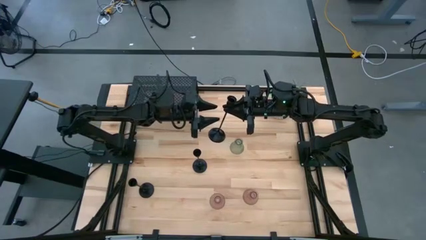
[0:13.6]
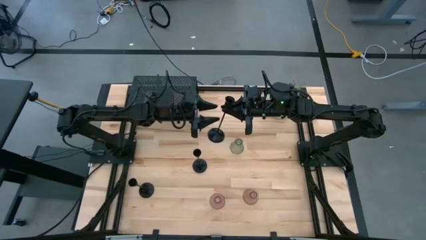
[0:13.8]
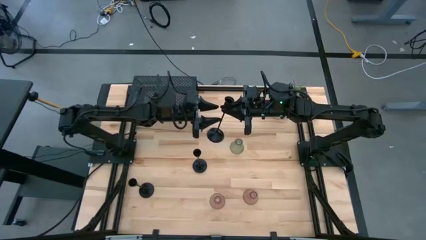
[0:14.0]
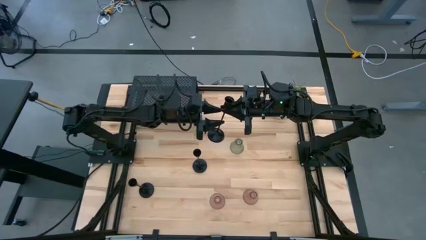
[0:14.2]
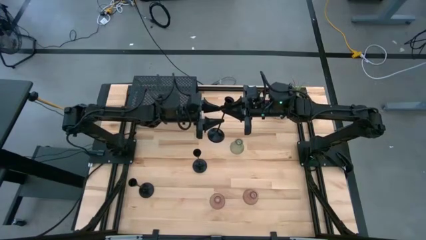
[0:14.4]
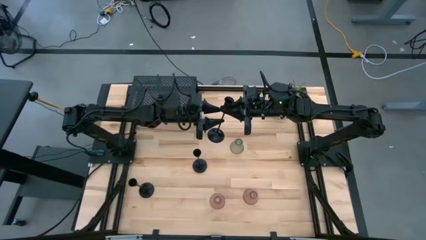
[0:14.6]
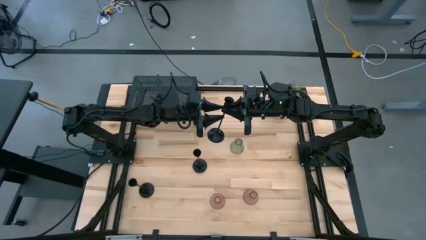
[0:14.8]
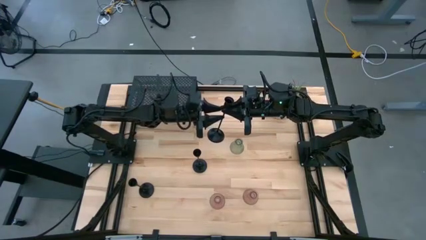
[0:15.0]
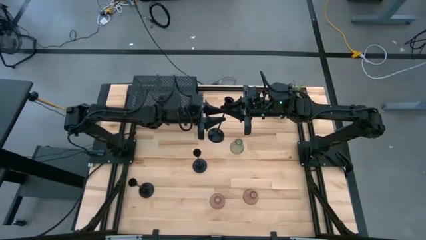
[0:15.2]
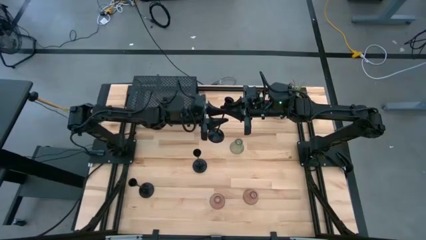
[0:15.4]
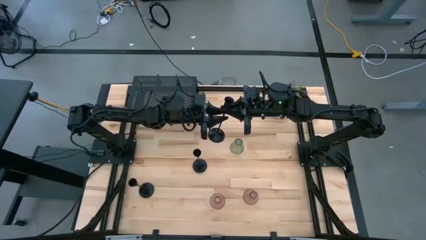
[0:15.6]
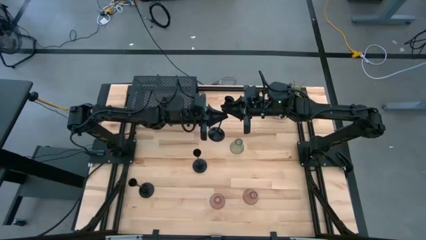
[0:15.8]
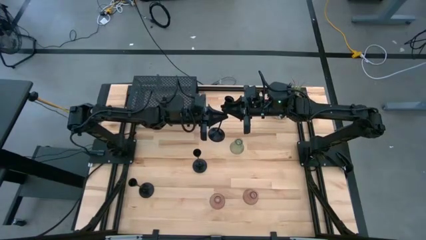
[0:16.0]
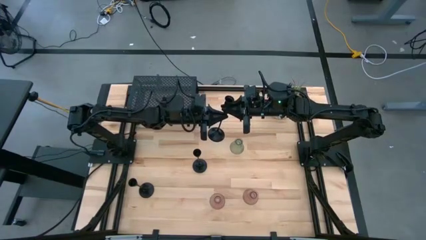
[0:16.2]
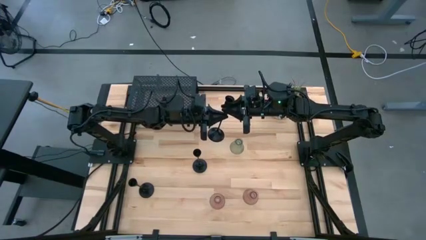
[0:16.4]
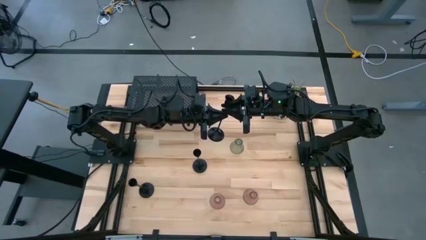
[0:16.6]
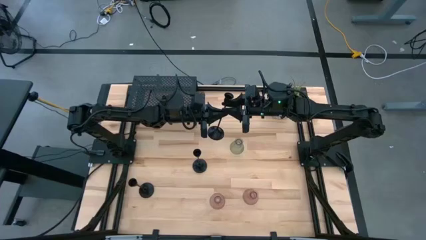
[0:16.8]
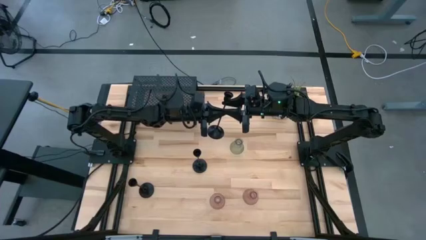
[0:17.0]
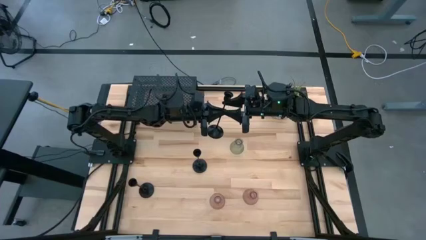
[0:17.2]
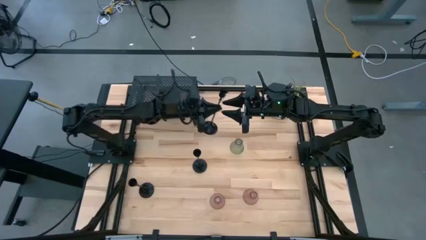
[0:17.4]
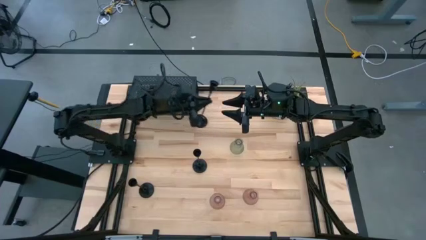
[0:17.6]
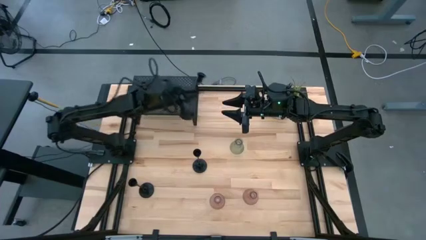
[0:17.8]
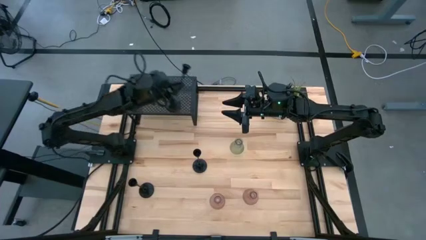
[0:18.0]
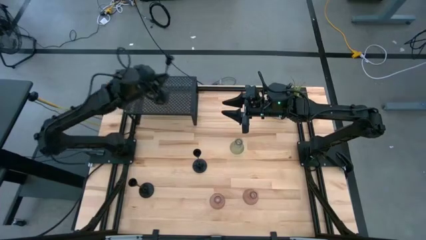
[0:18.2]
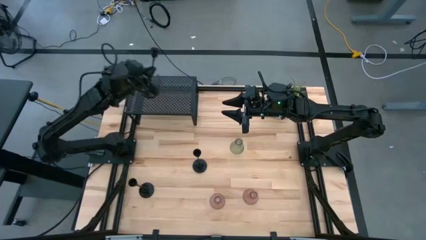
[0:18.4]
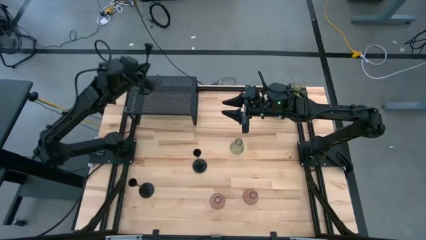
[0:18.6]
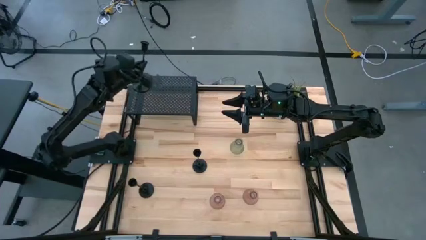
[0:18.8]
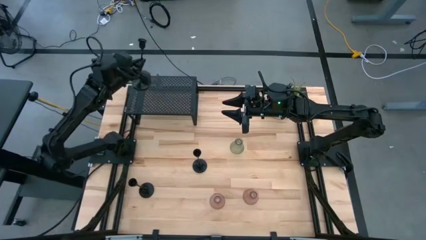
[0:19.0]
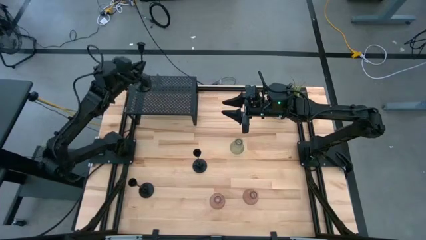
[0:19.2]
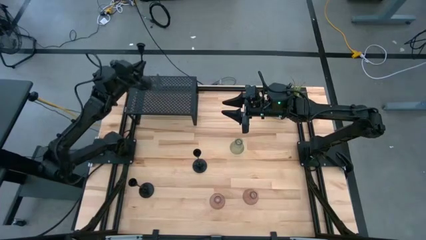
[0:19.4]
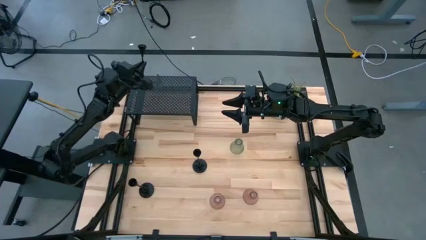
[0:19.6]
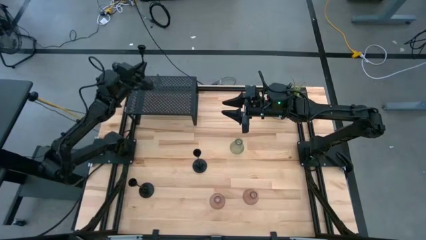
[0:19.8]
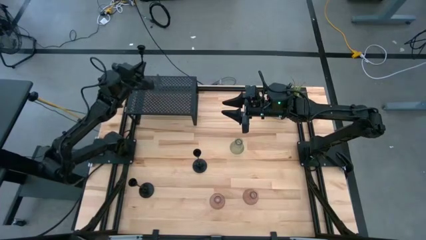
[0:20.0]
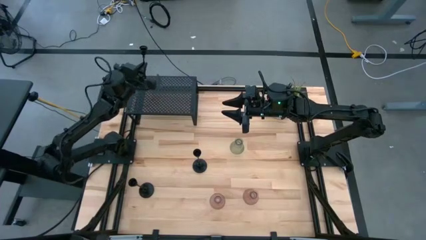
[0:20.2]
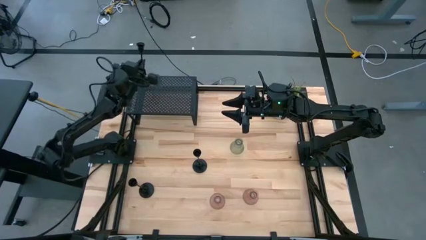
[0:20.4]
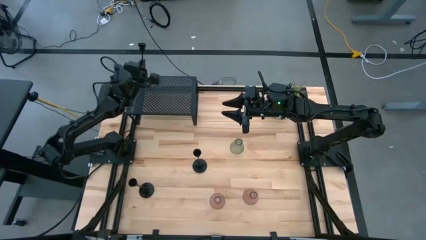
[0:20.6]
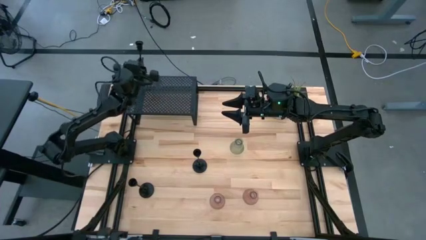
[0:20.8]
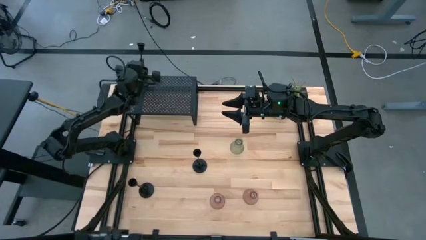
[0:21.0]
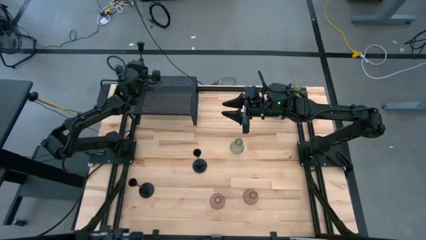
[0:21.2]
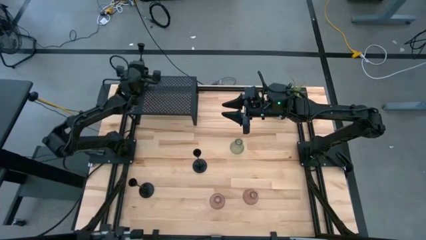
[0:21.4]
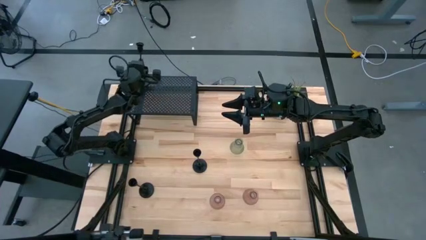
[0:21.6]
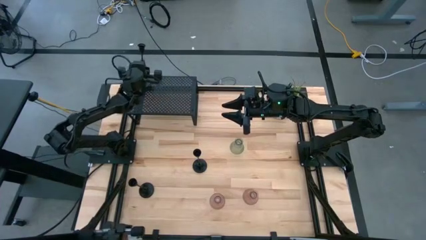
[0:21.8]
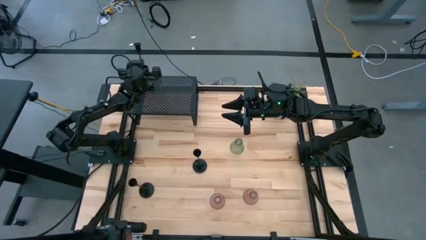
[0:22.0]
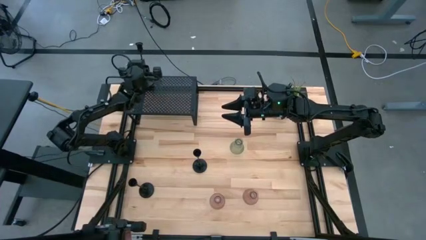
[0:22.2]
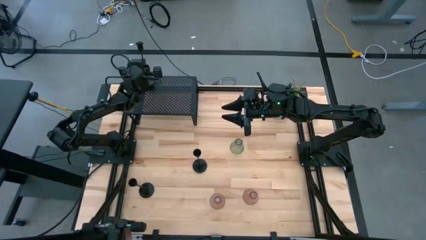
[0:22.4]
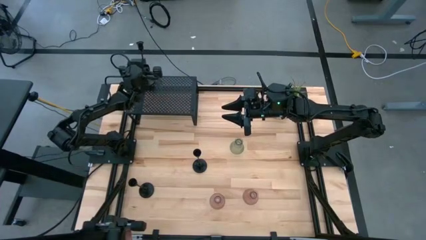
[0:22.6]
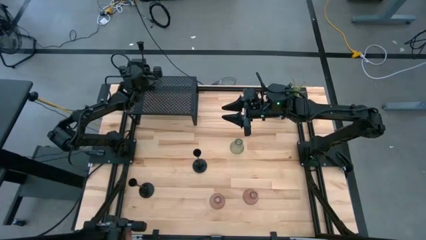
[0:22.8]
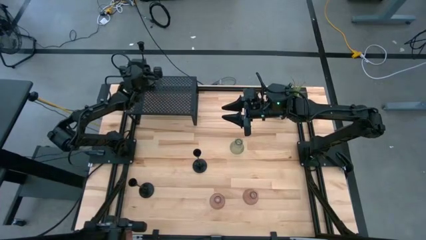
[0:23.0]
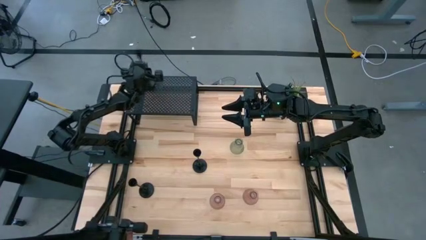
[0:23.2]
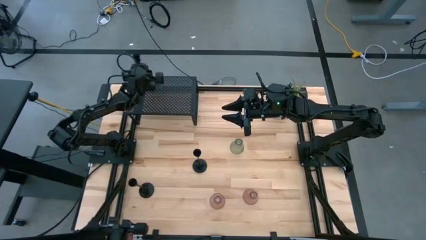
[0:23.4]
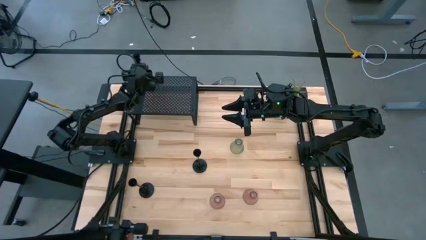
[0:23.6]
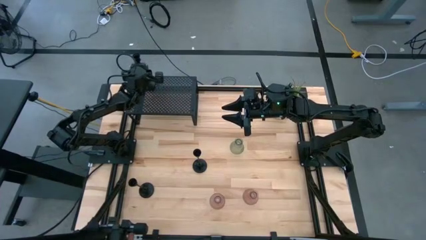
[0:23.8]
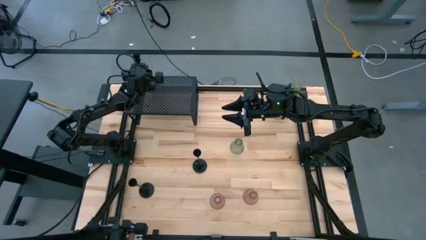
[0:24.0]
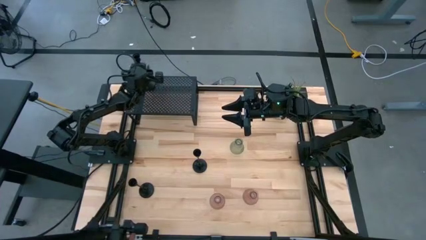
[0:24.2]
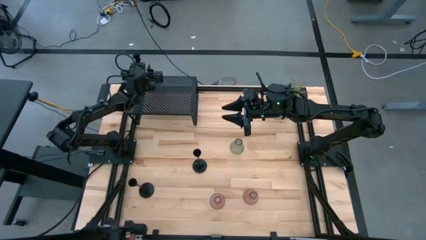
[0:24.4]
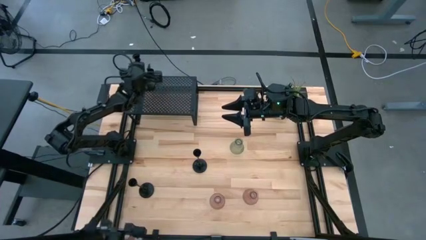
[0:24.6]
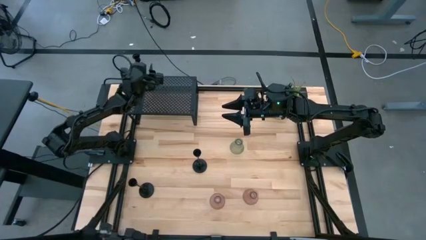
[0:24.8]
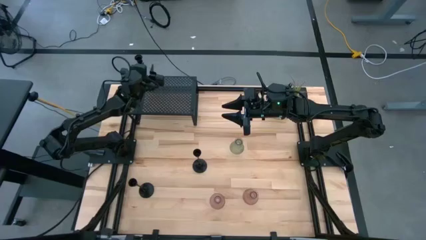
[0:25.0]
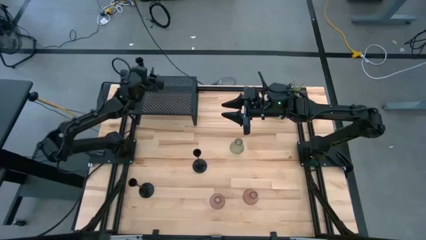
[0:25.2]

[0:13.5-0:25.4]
Task: Pick & Place candle stick holders
Put the right black candle holder on the shelf

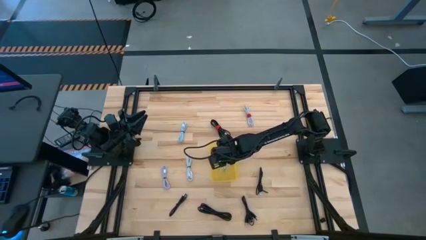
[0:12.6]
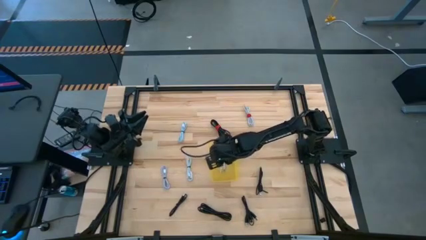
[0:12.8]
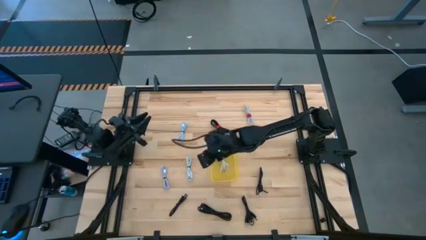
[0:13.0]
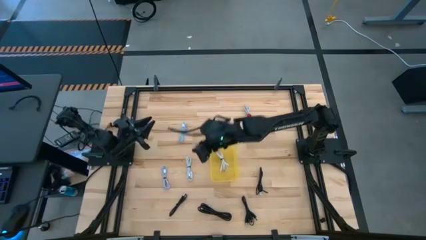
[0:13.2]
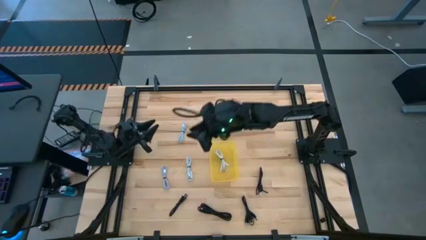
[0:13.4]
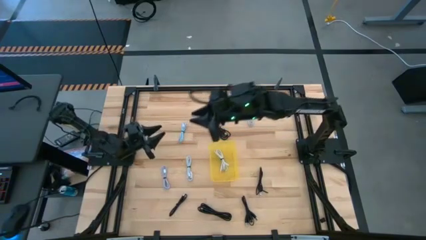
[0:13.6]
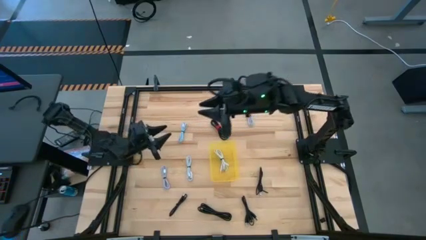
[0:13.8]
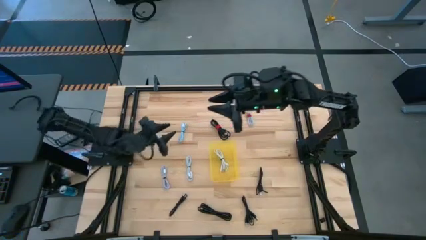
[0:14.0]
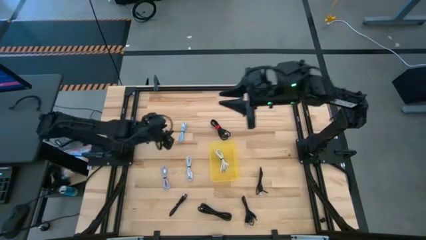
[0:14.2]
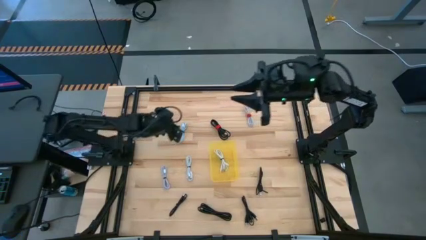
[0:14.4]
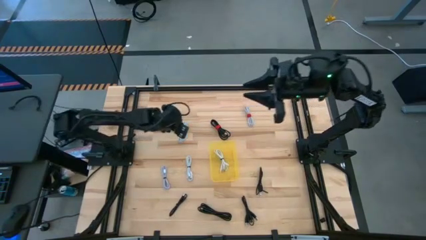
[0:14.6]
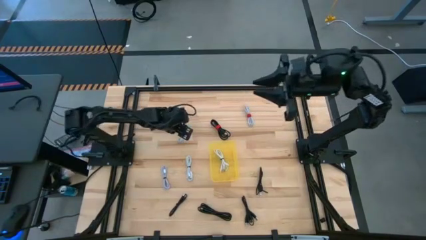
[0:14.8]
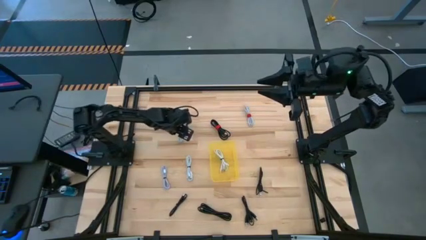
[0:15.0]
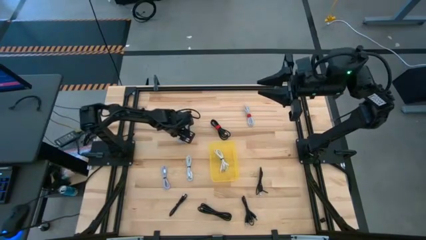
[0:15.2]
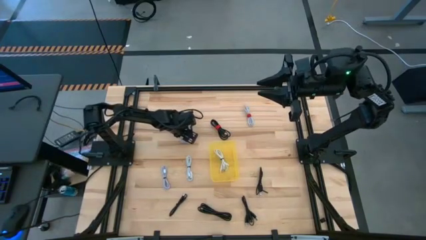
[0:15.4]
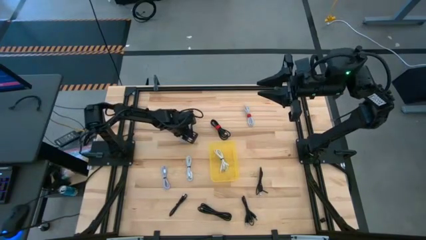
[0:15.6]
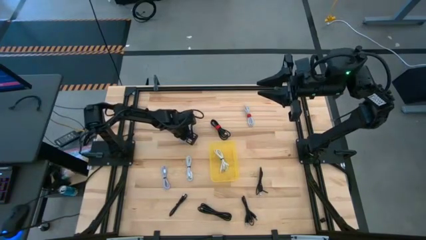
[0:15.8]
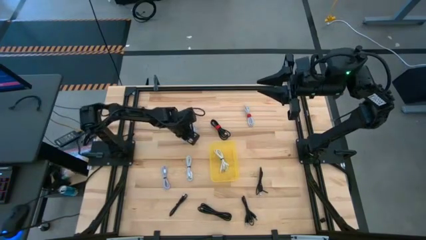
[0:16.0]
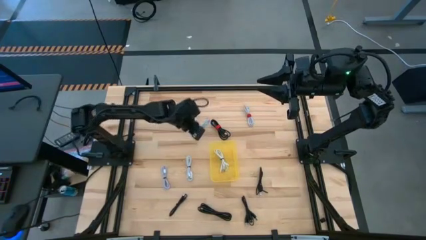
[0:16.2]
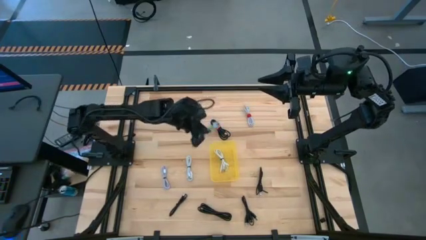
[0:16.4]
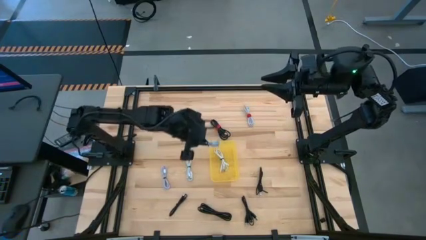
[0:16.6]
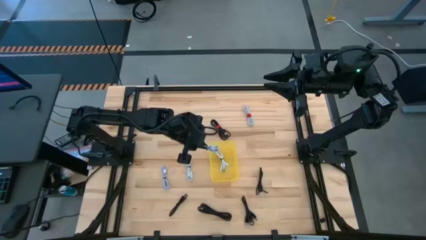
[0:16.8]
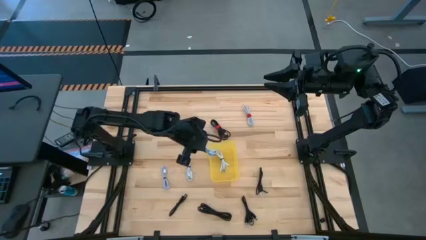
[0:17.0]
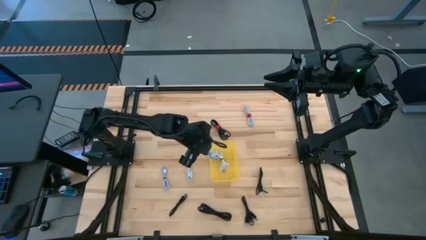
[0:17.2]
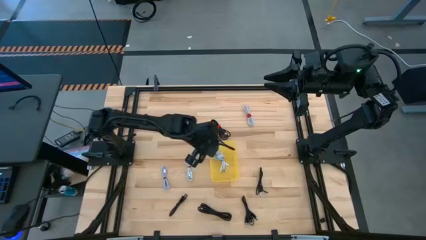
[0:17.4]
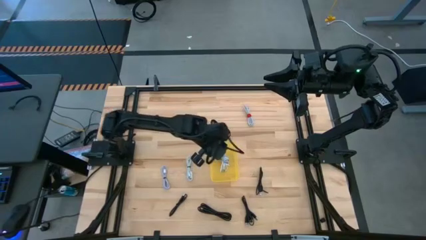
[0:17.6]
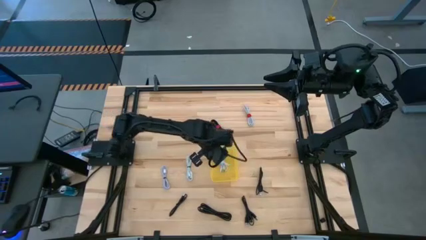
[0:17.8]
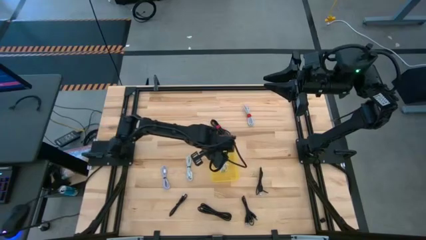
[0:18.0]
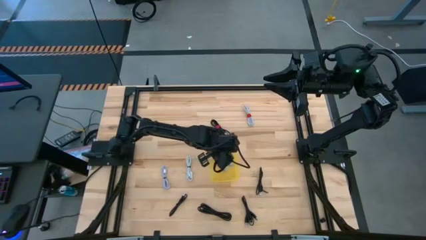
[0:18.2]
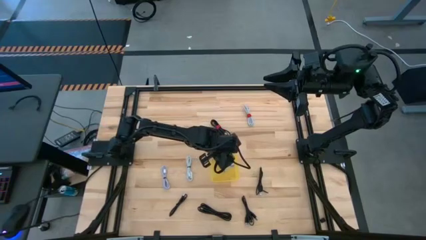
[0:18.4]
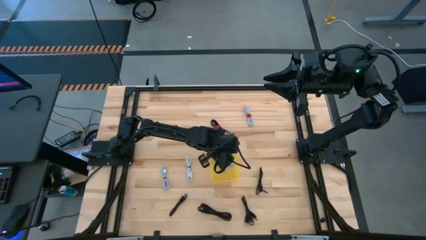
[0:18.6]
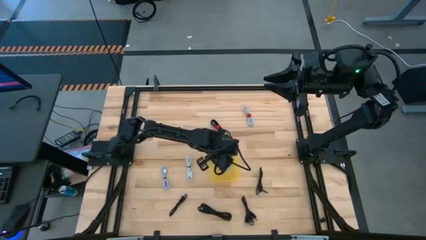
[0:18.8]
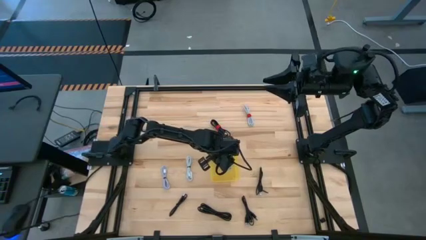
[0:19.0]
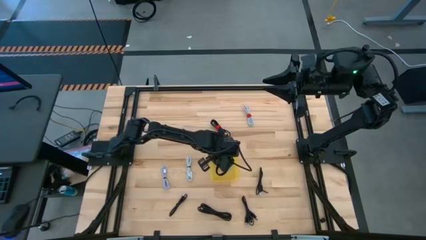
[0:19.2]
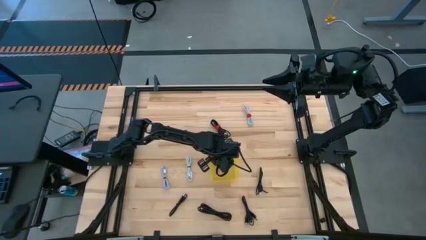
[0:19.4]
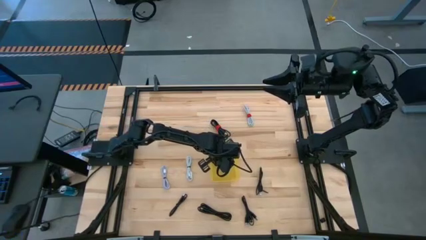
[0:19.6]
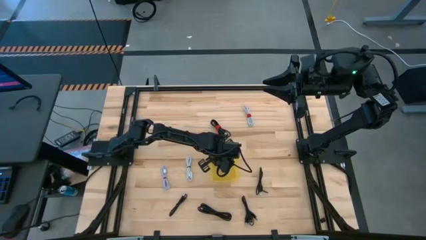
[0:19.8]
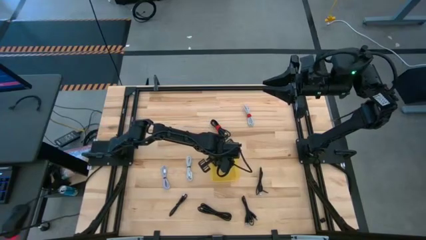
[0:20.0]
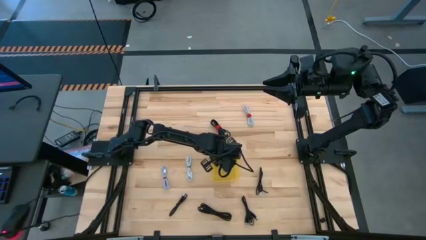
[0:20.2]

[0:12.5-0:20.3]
Task: Pick and place USB-C Cables
Put the blue charger cable into the yellow bin
